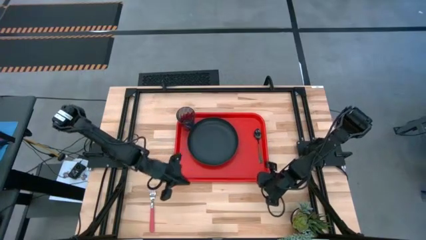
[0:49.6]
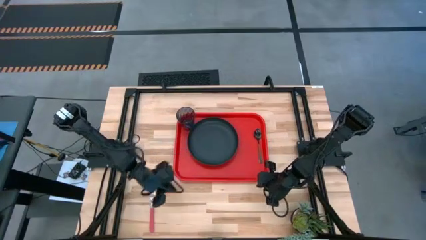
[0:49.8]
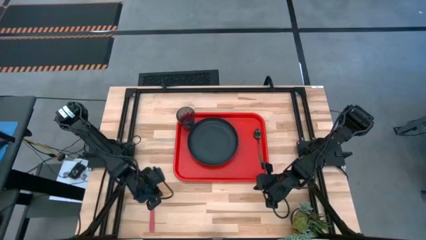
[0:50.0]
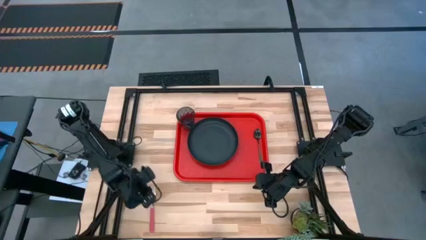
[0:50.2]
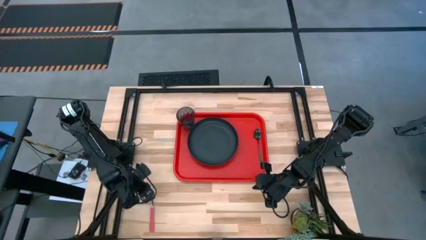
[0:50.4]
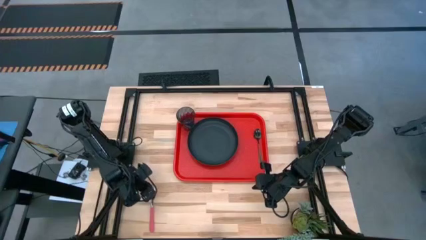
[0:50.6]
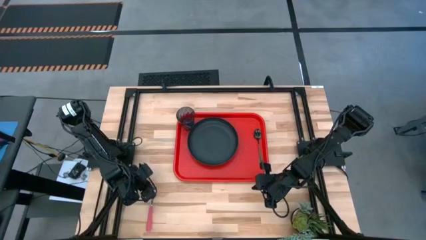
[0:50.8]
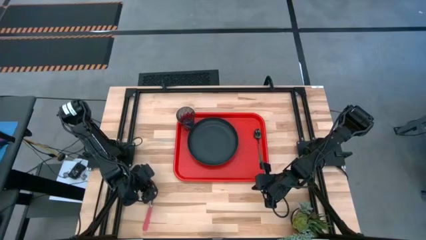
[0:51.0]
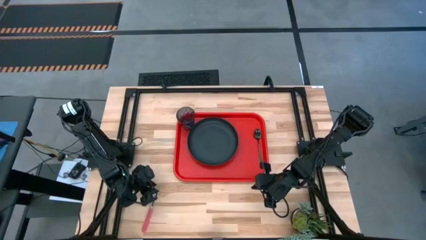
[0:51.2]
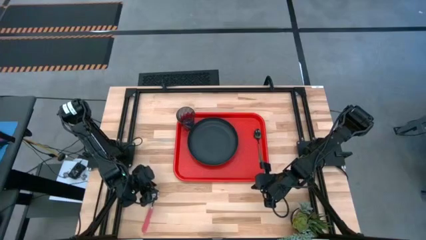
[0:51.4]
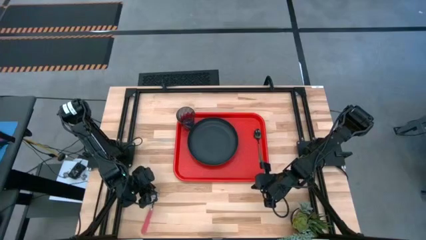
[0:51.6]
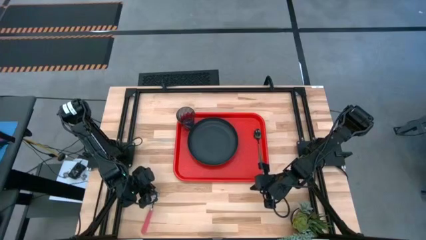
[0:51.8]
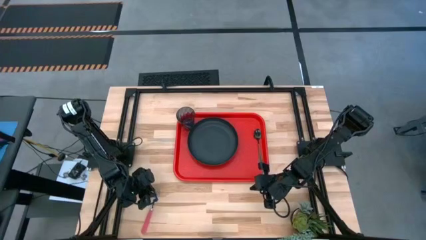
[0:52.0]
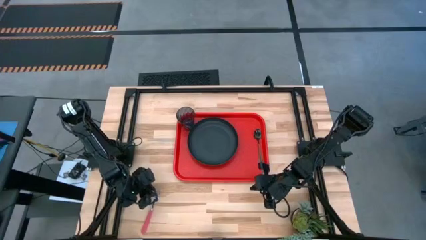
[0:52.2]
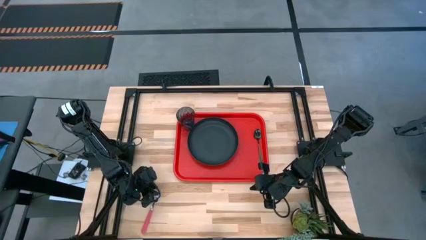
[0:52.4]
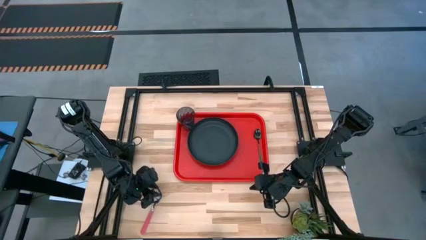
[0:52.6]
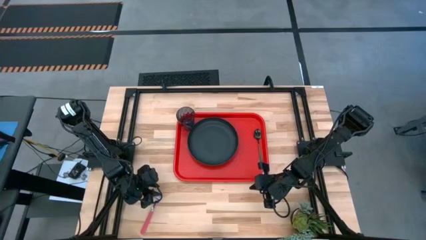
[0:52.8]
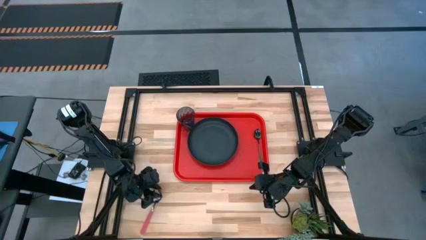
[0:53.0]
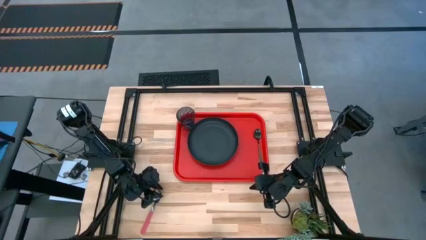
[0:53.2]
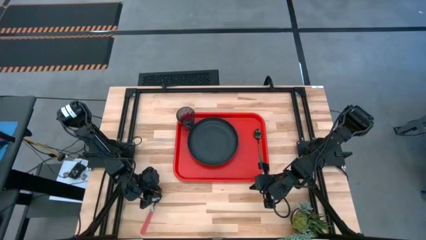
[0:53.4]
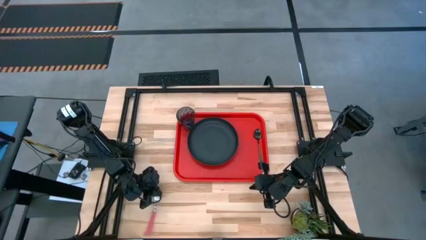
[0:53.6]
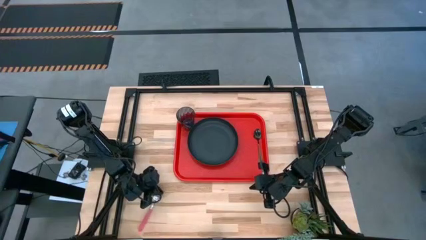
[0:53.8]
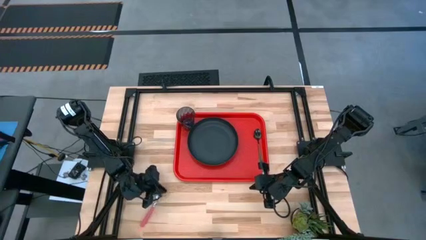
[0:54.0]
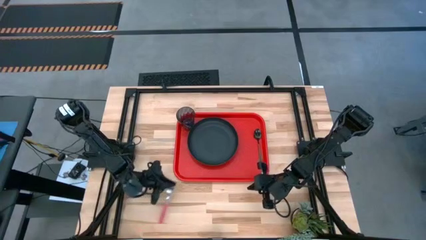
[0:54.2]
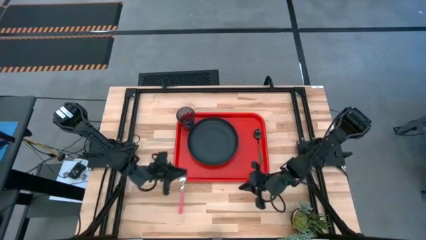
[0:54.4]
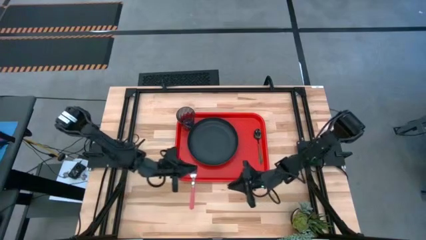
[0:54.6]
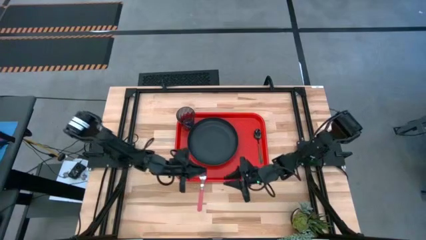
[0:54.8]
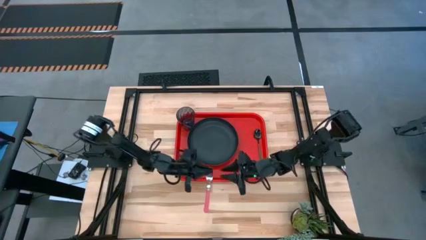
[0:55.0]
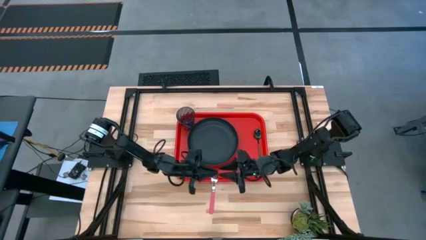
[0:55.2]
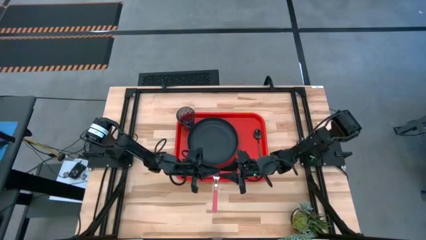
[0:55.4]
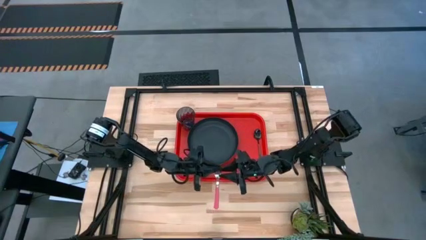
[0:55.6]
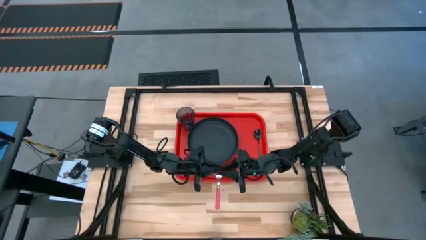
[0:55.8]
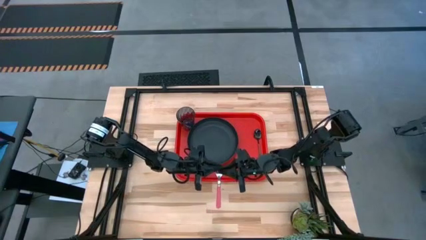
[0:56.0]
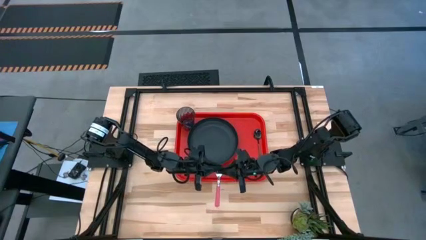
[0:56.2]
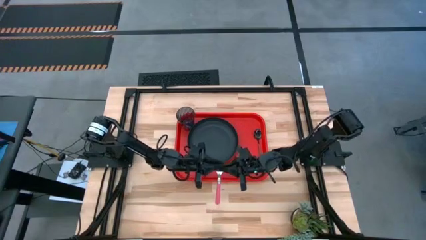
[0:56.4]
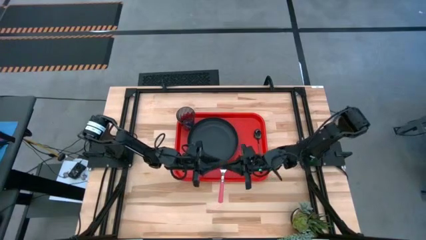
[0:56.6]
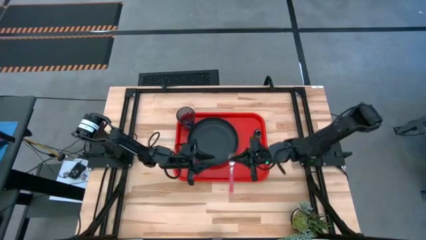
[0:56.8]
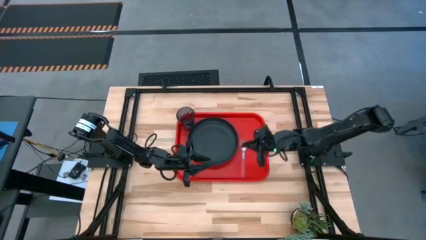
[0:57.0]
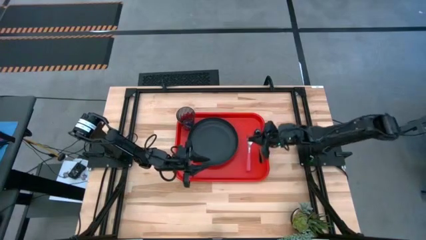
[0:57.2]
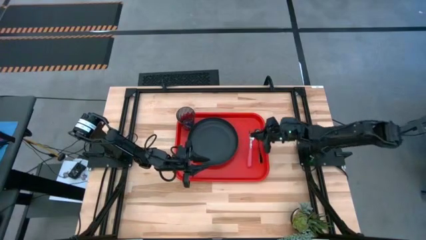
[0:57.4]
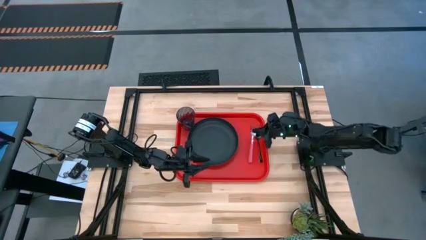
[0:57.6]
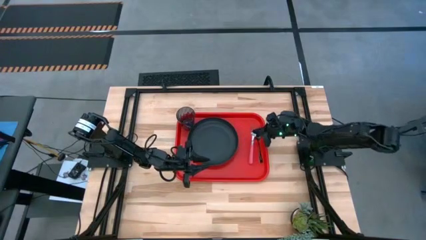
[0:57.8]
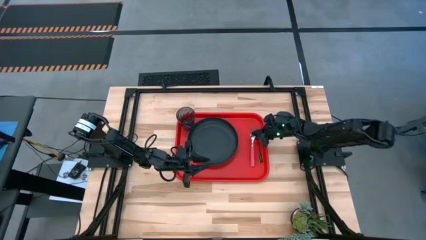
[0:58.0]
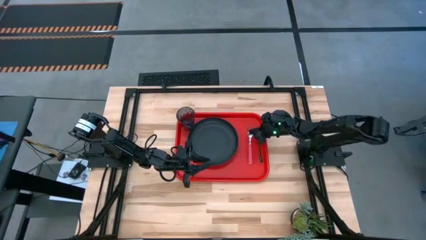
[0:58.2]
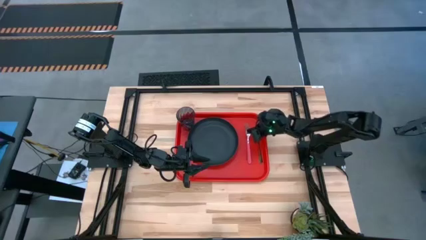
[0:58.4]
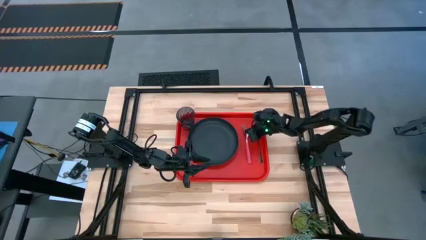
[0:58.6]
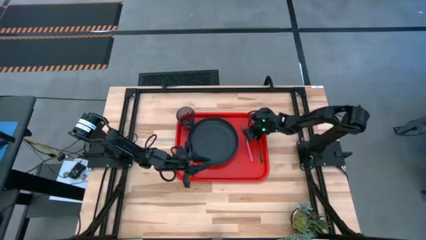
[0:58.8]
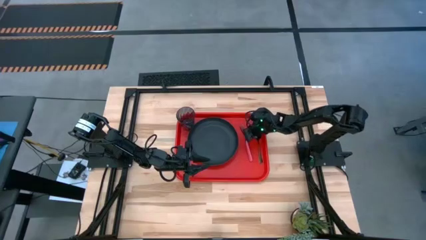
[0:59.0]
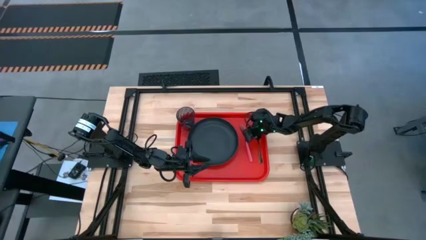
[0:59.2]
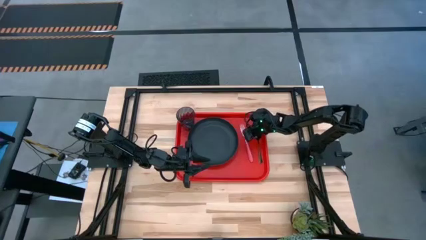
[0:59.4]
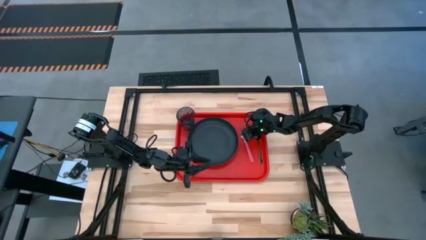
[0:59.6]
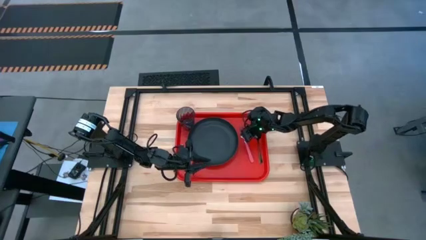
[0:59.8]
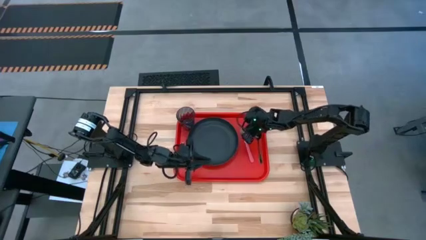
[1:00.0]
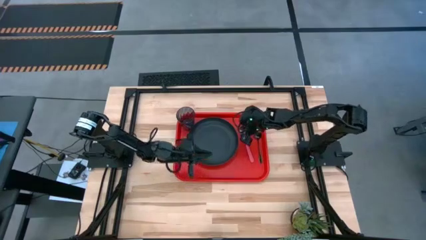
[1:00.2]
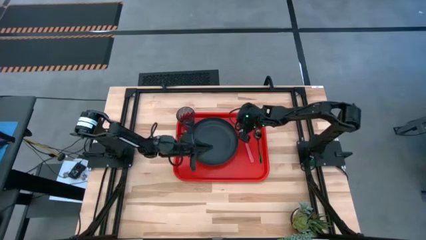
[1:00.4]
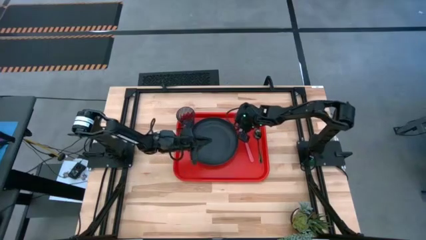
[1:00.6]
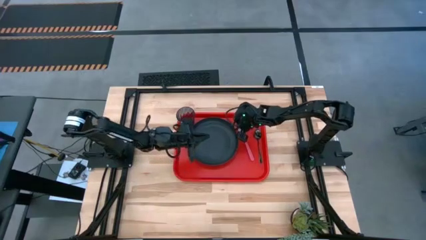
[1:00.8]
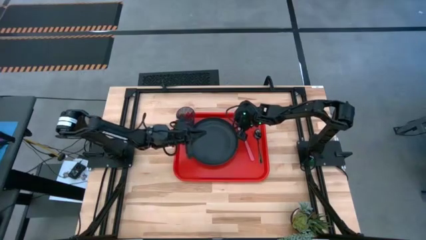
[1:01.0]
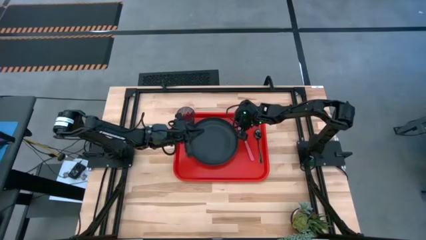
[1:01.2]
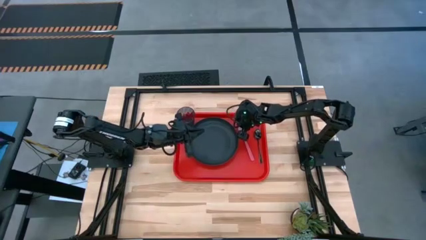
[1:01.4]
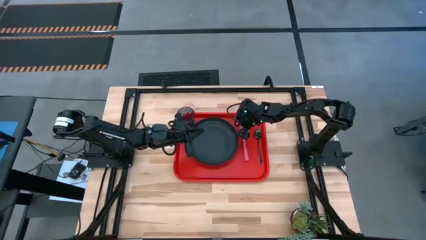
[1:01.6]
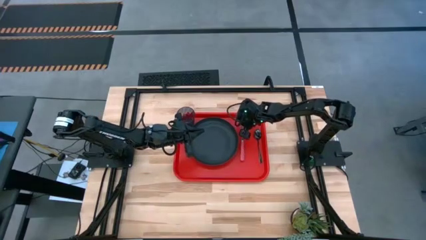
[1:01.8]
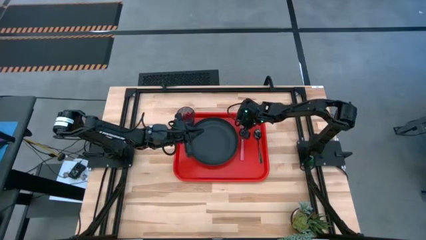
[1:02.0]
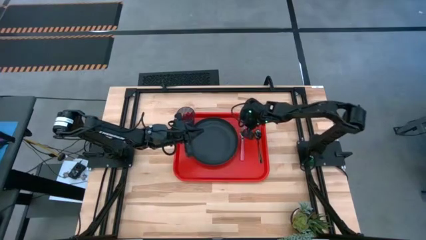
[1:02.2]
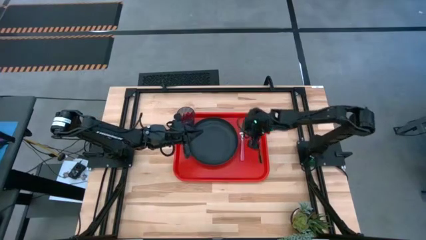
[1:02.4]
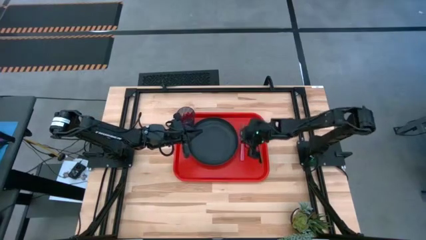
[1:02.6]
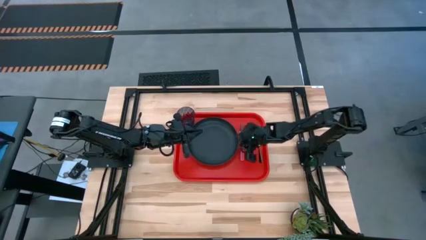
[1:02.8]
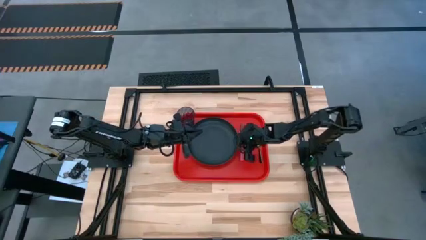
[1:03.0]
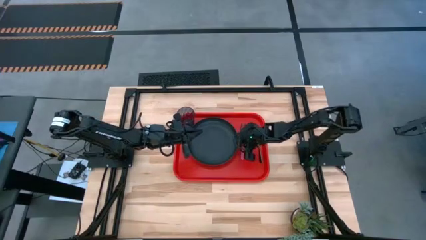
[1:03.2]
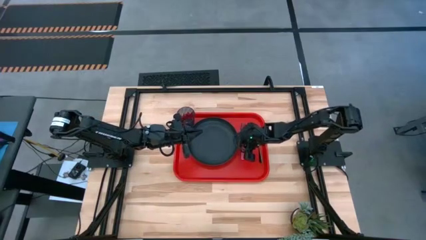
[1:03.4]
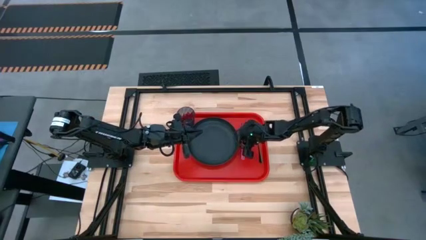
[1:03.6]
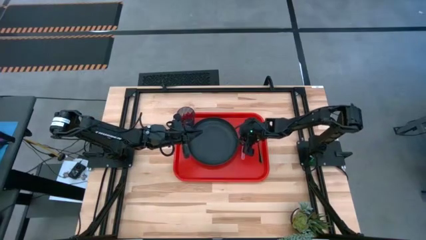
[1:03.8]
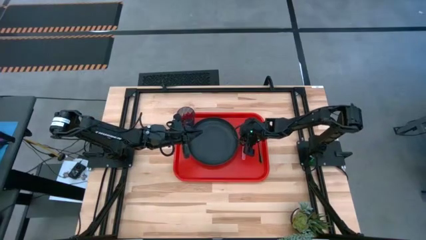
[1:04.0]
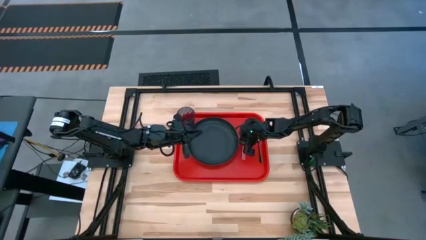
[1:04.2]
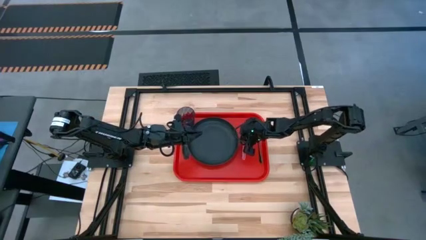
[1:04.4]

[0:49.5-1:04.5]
Task: Pick and place plate/cup/fork/spoon on tray
Put the pink fork to the right of the black plate on the red serving tray

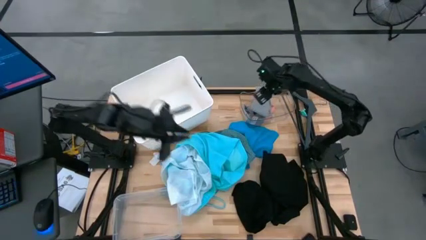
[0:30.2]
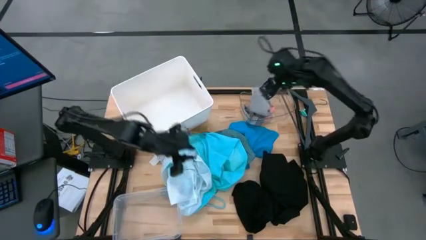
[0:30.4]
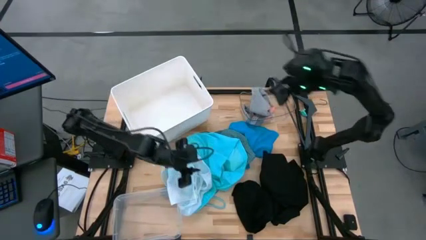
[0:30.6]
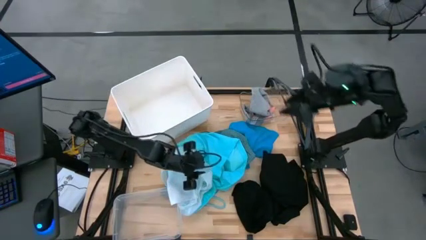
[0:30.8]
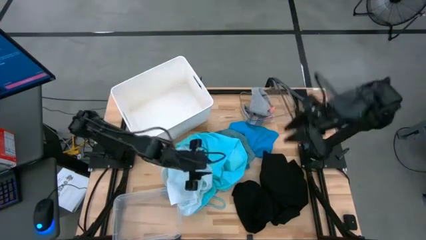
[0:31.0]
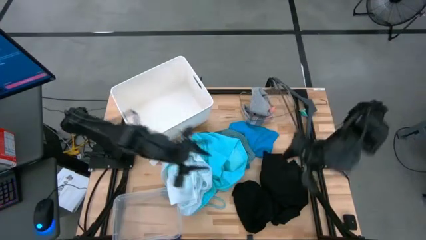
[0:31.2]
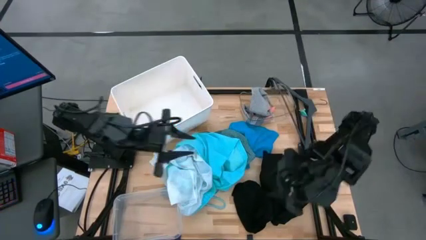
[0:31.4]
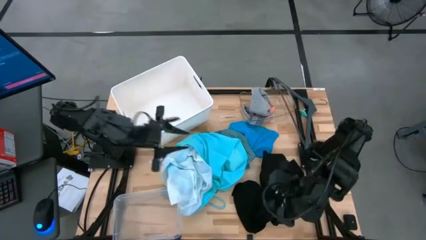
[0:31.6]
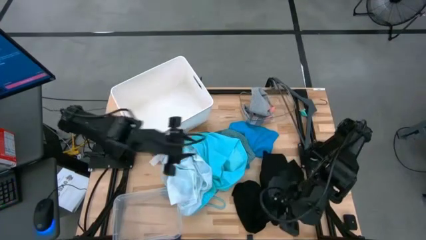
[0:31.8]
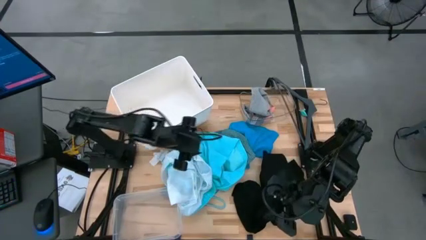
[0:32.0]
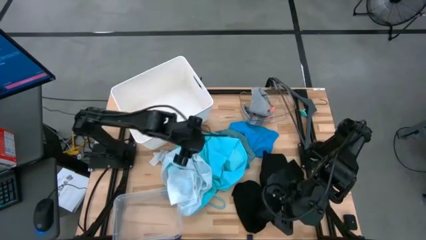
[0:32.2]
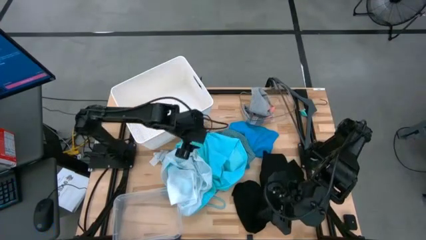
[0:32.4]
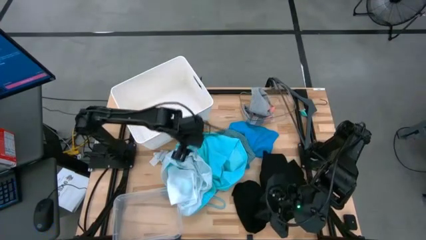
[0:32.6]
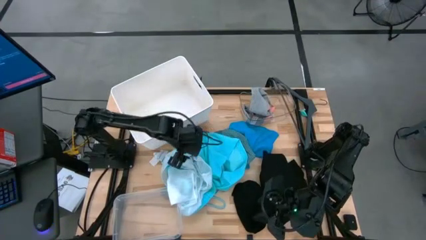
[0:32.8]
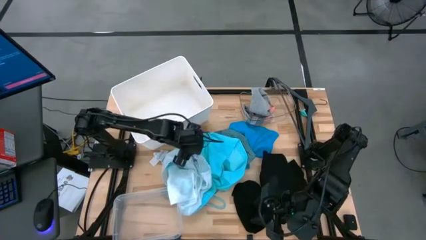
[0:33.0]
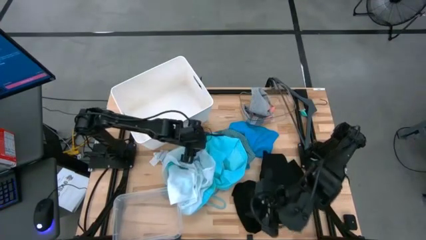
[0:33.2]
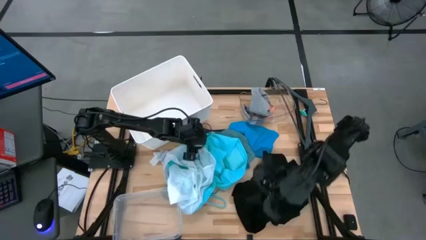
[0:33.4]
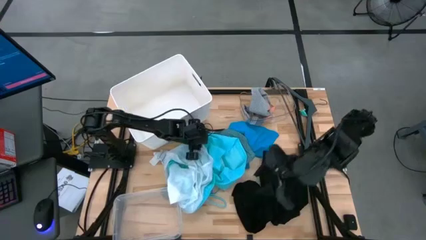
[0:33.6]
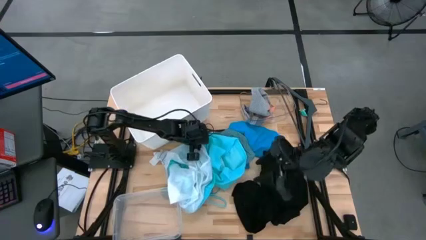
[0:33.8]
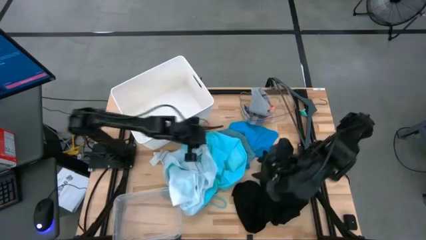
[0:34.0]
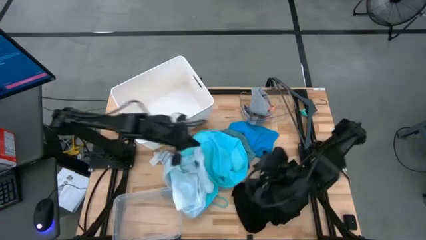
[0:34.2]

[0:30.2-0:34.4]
Task: Pick & Place Cloths
Put the light blue shorts into the bottom transparent bin
